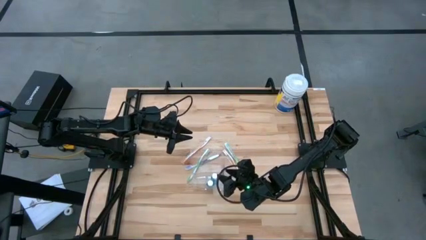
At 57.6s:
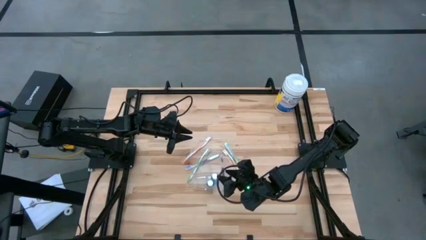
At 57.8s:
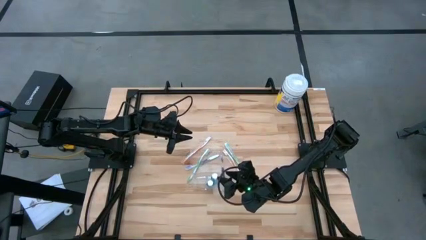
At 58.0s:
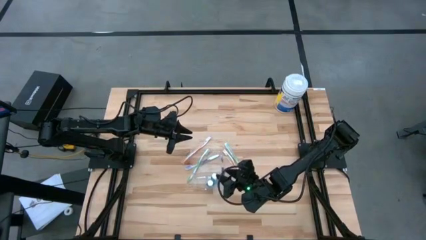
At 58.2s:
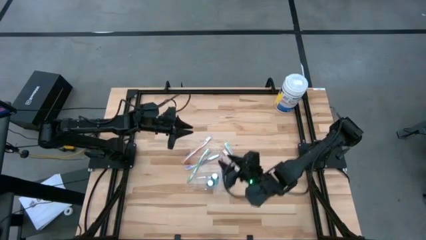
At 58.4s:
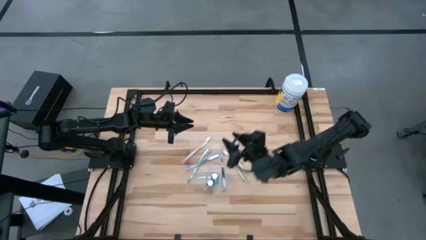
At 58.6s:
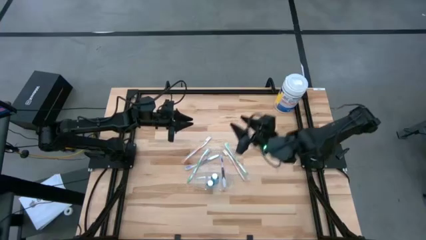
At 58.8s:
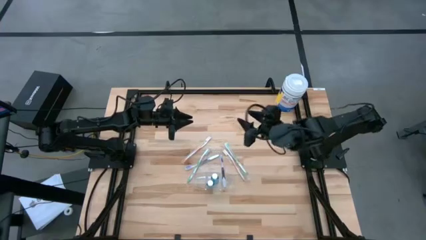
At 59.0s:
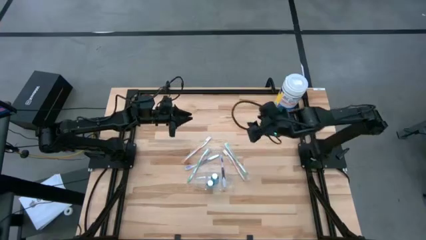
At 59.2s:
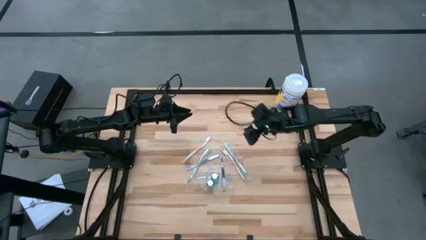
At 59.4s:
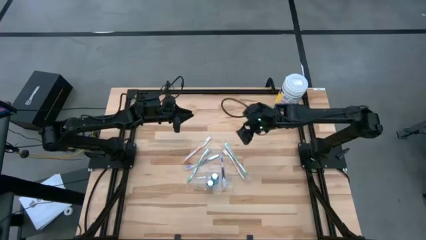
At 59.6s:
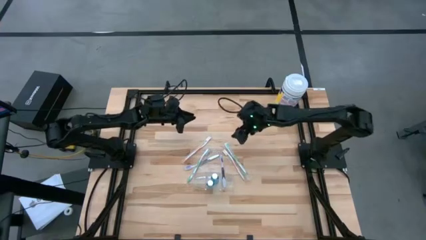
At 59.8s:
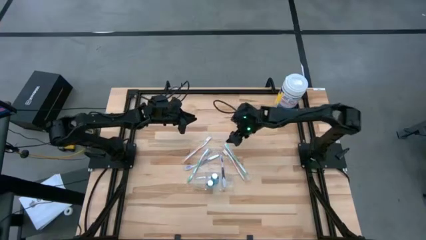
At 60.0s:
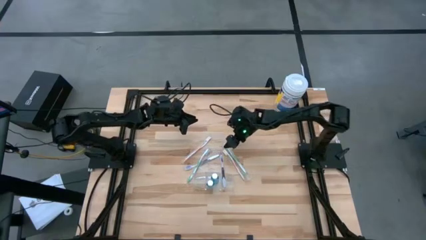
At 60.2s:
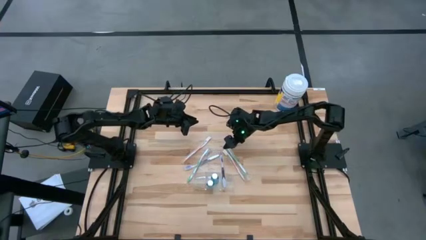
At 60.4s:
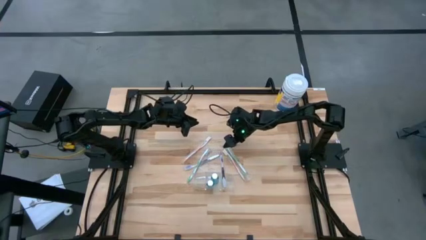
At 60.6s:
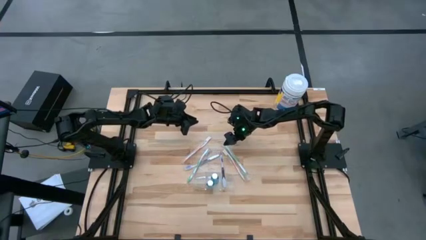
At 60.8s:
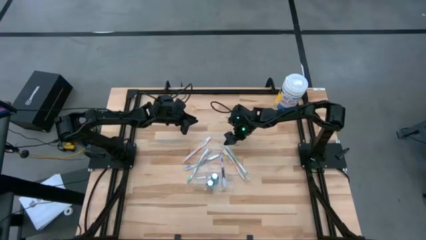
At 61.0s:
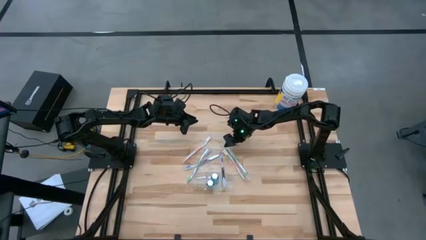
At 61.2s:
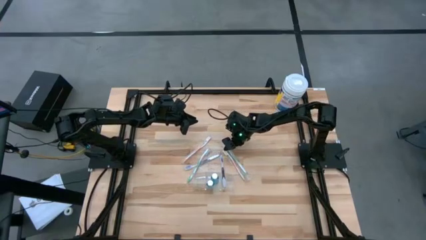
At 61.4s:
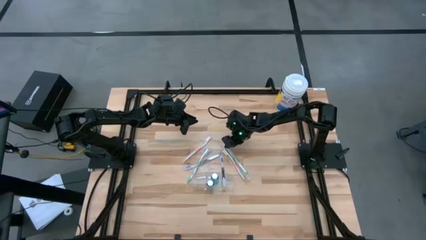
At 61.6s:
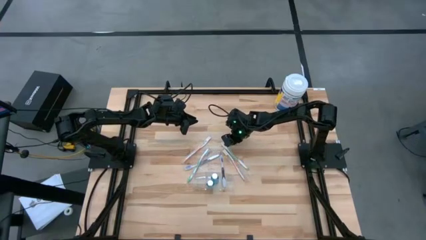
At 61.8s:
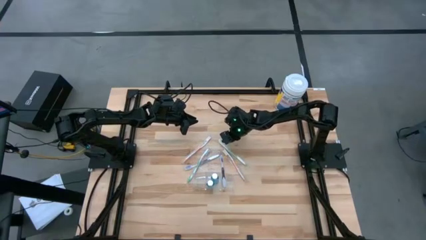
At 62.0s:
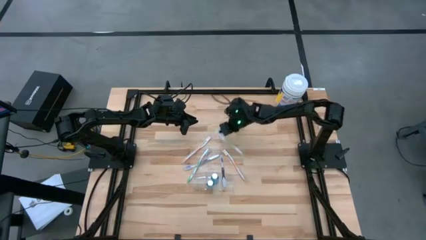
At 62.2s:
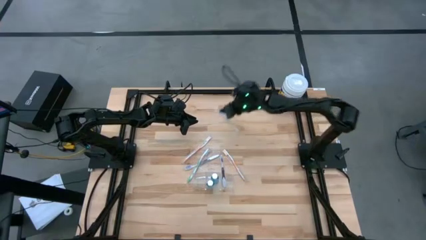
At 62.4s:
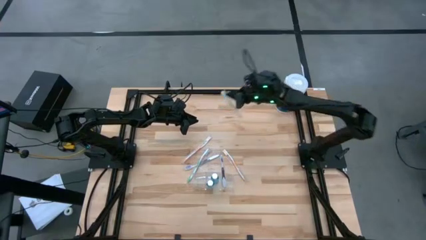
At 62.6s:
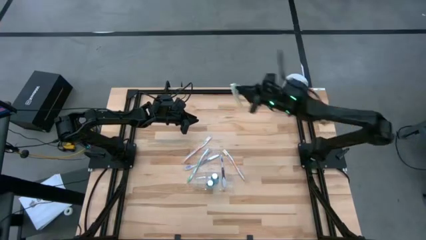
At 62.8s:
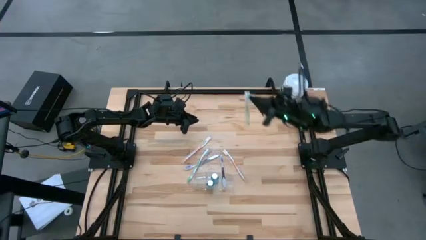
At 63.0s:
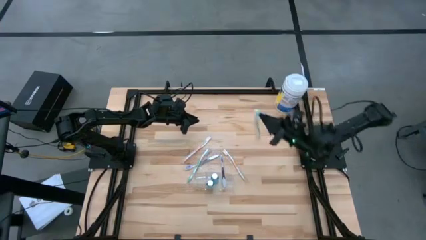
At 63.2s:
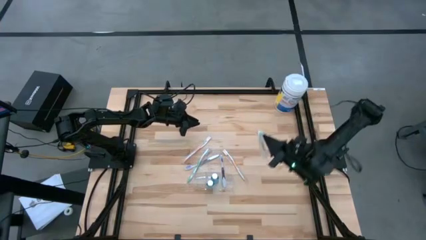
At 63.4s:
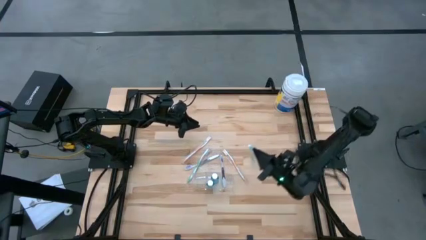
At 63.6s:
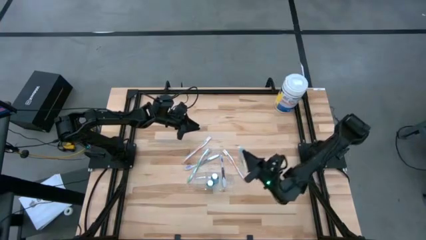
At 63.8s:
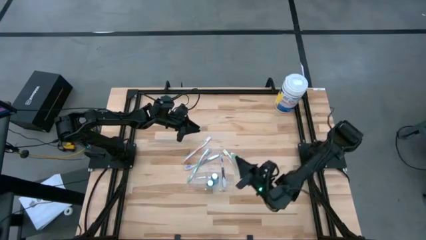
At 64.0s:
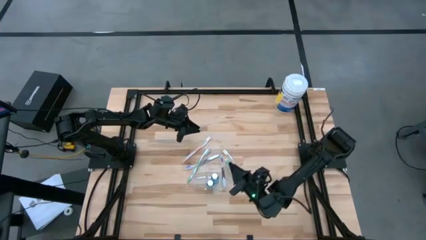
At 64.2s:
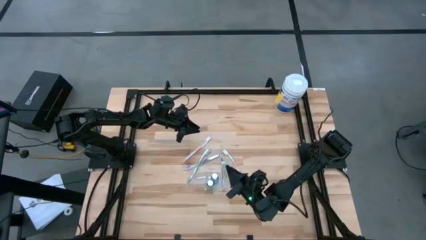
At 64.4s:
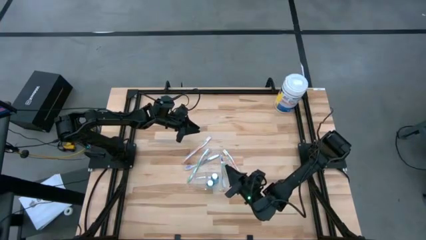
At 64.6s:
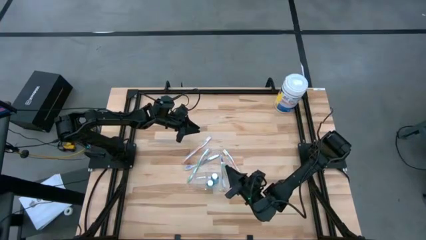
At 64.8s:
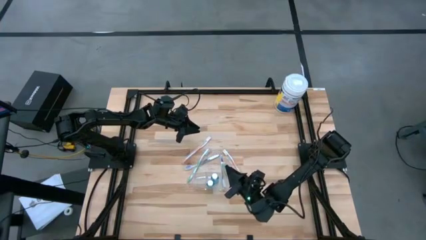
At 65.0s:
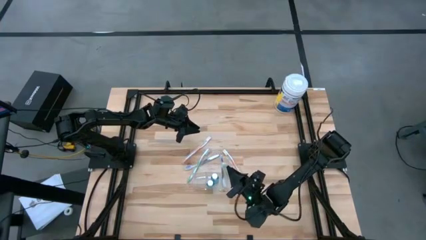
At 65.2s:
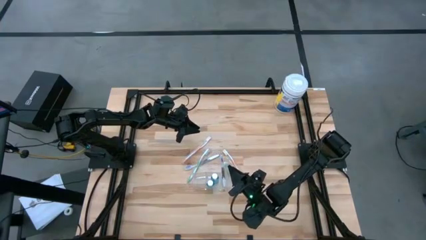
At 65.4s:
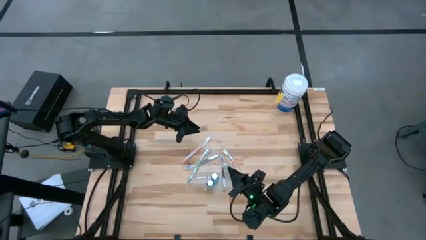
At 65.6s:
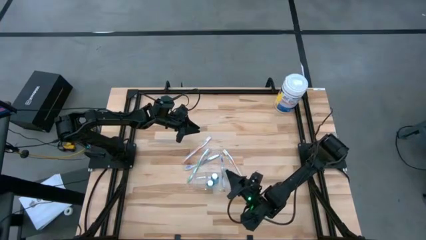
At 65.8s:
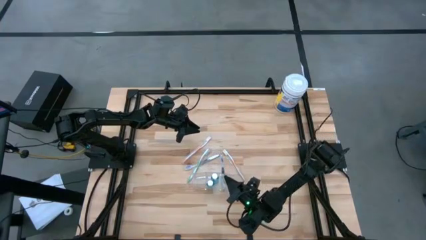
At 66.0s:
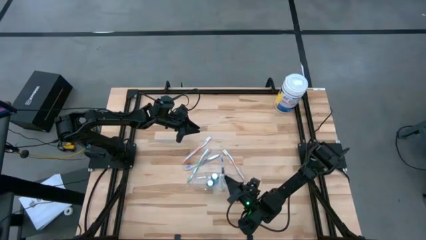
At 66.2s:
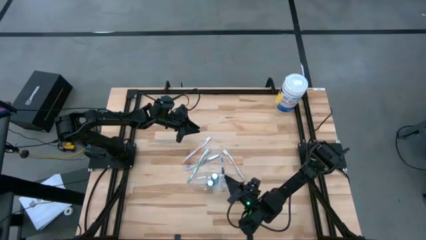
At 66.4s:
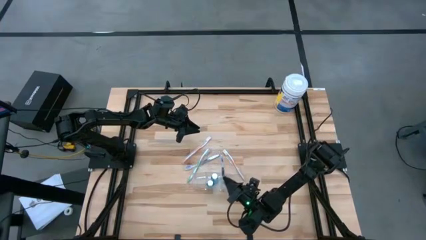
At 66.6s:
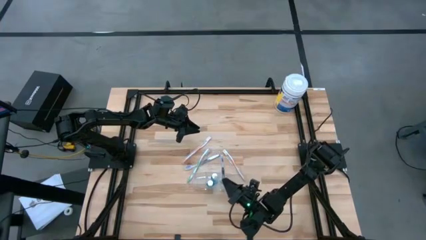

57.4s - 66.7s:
Task: Pick & Place toothbrushing station
Put the green toothbrush into the transparent organizer

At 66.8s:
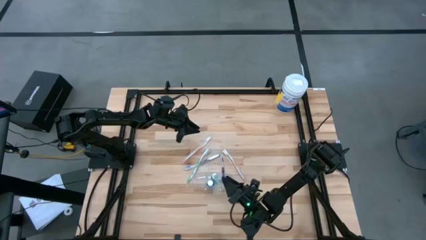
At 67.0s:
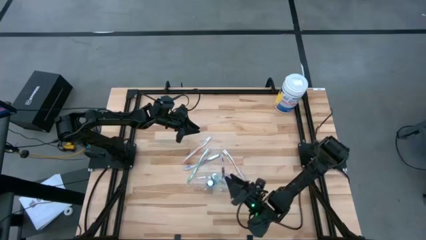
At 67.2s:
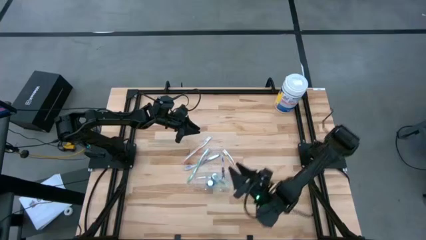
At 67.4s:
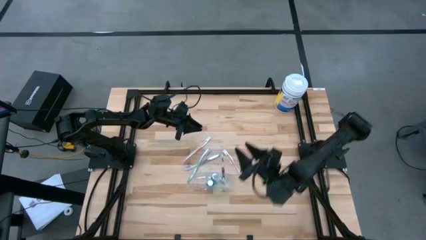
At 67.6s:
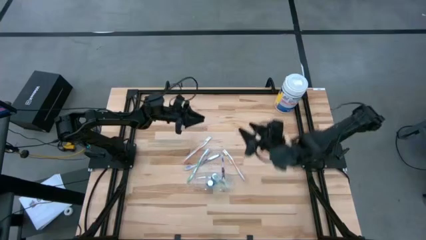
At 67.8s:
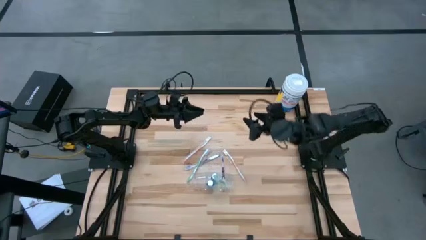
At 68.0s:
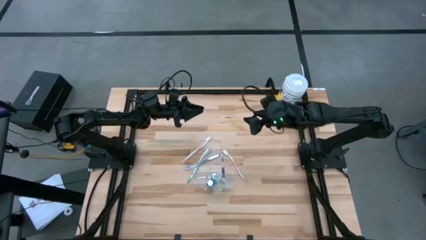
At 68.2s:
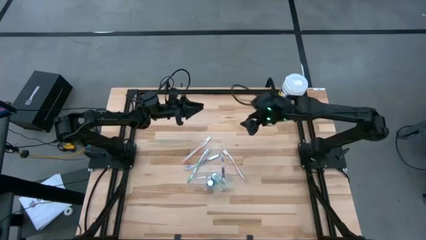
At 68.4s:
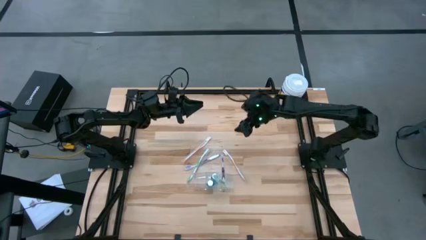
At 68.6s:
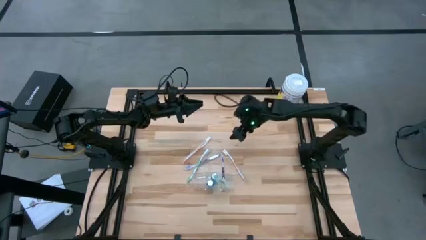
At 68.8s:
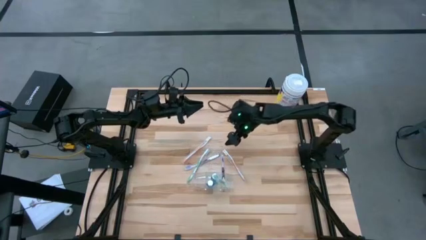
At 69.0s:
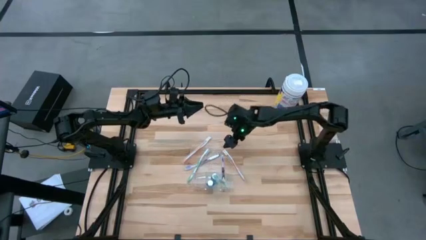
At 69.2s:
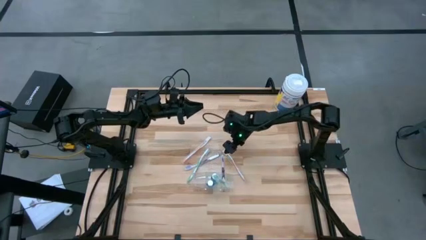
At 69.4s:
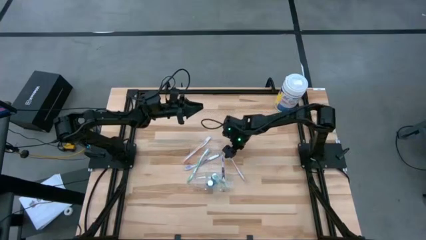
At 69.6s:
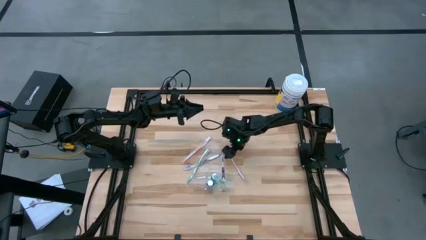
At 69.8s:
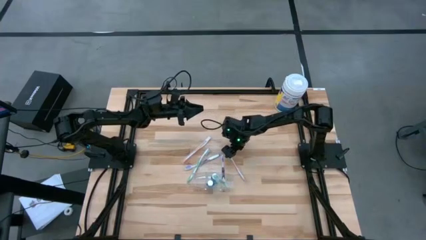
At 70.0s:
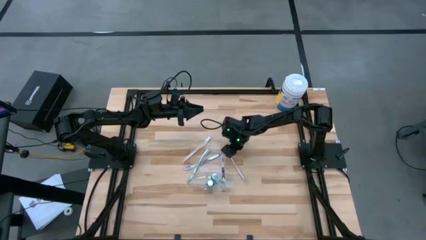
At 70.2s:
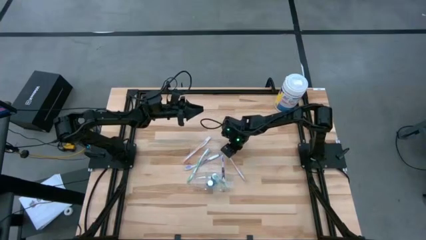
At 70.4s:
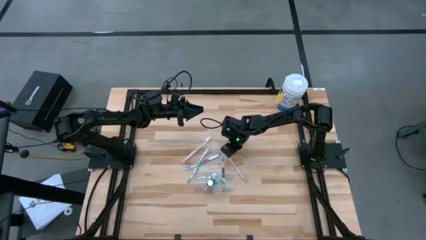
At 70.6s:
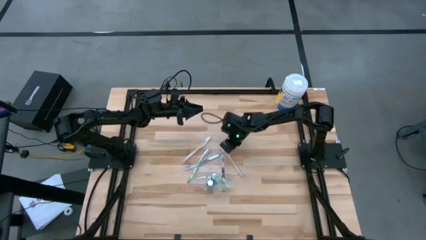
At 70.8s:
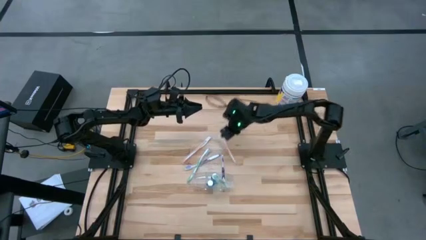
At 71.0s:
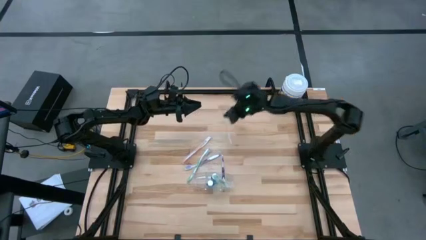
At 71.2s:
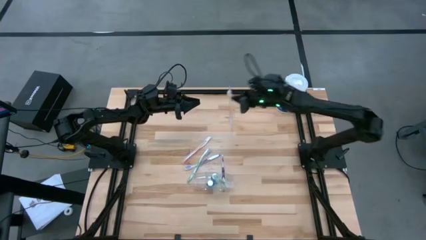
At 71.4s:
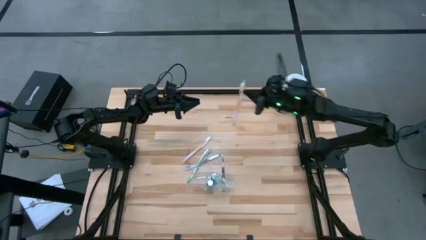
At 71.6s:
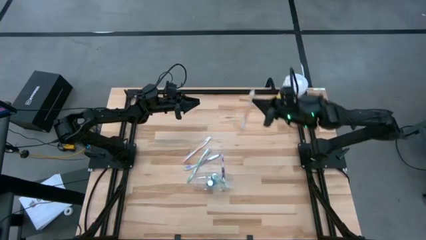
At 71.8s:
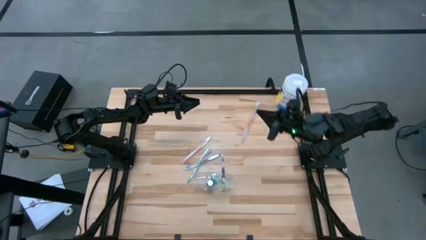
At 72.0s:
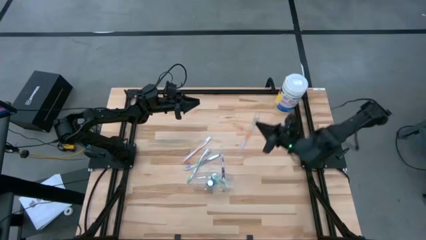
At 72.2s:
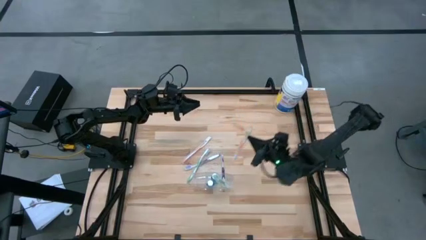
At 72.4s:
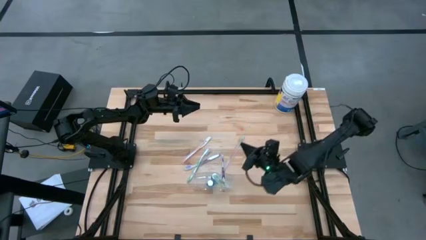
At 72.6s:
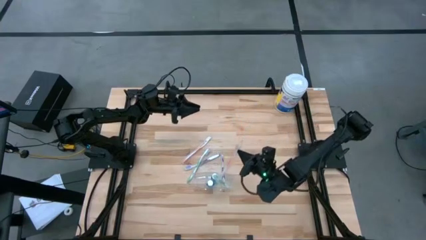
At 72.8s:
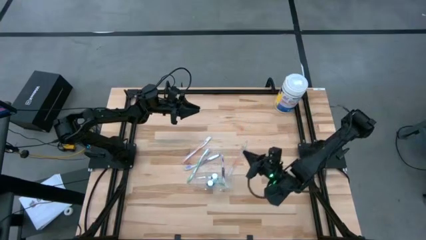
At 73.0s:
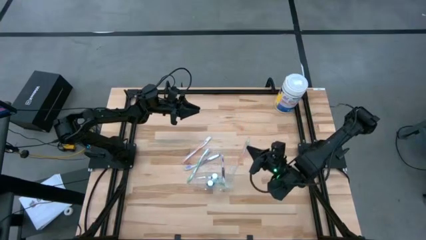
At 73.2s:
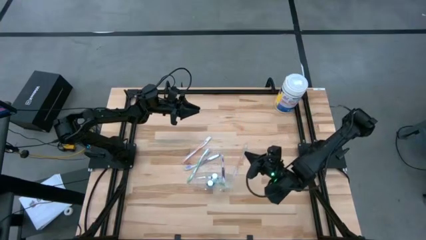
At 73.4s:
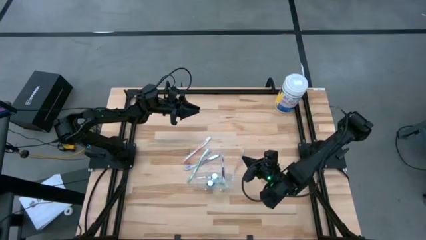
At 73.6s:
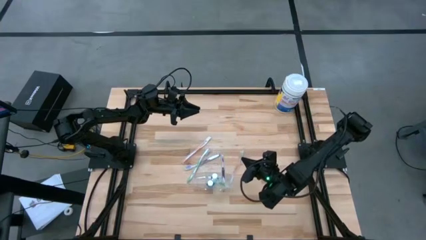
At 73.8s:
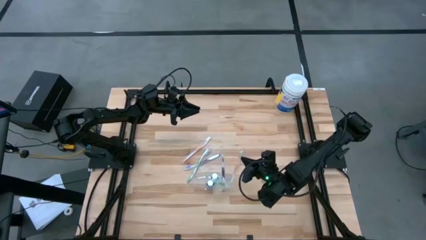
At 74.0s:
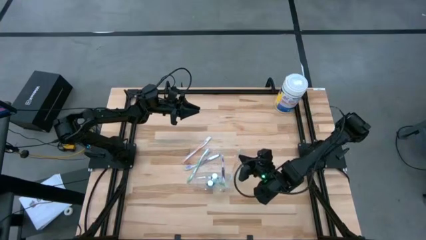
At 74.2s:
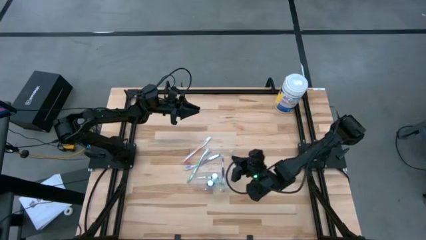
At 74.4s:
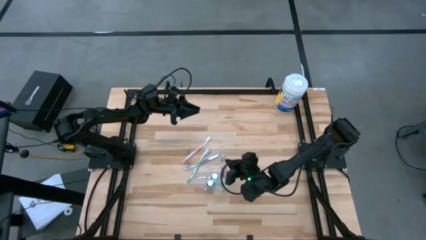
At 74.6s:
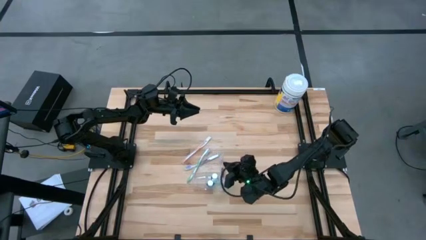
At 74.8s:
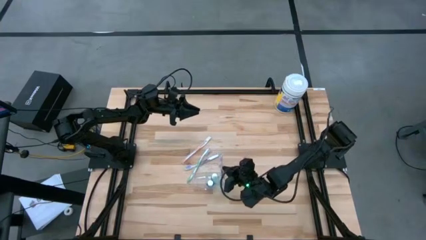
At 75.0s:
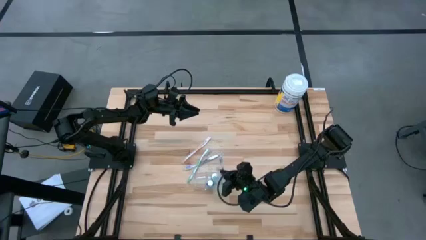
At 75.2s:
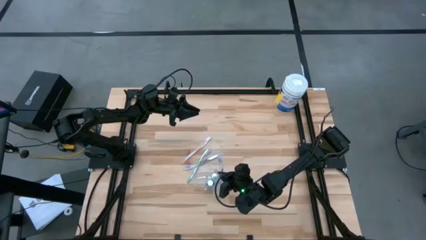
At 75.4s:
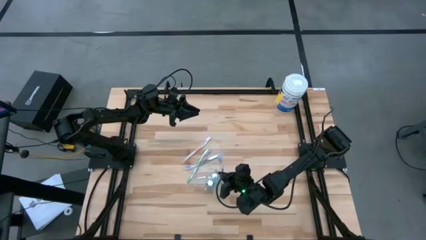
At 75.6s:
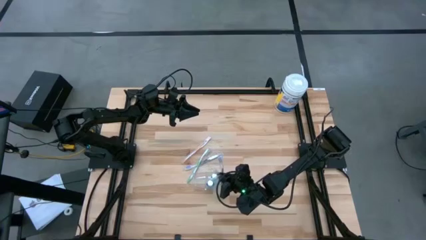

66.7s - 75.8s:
Put the orange toothbrush into the transparent organizer
